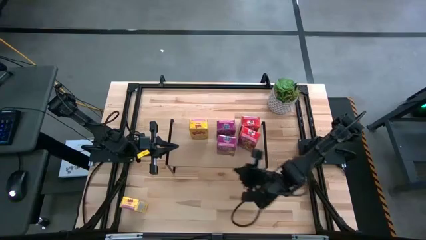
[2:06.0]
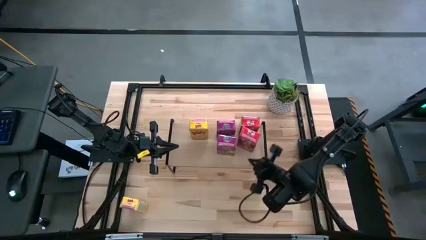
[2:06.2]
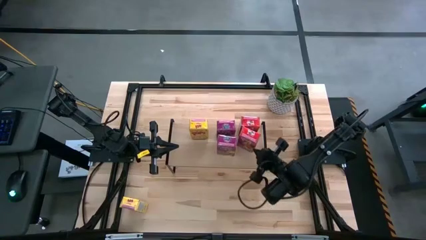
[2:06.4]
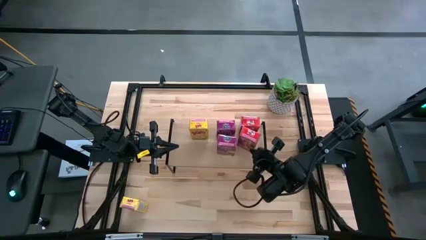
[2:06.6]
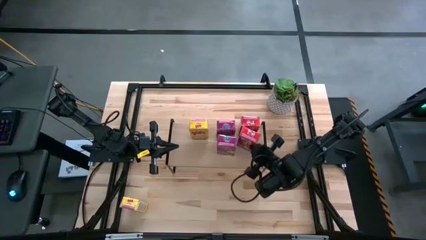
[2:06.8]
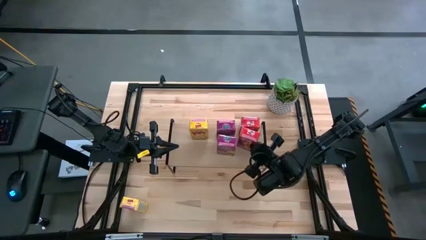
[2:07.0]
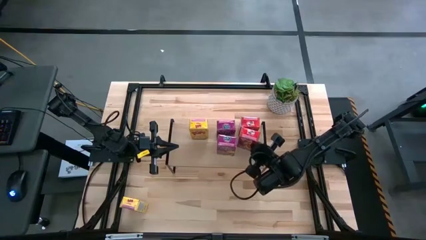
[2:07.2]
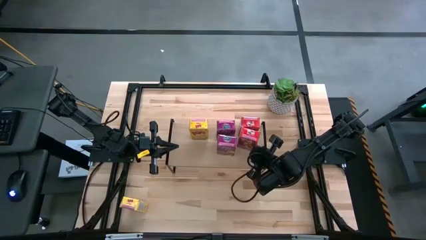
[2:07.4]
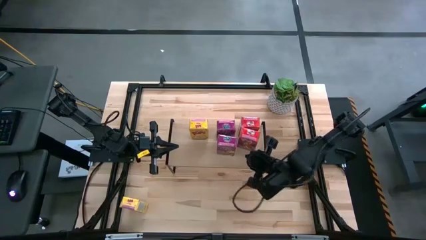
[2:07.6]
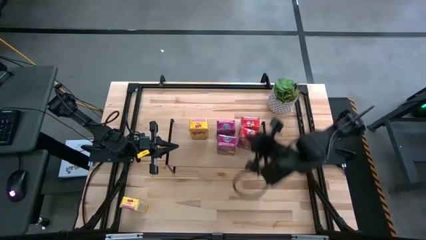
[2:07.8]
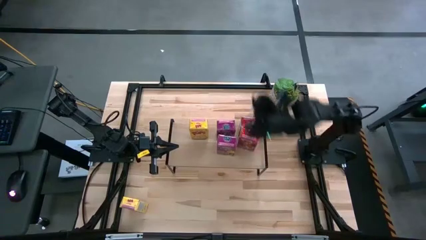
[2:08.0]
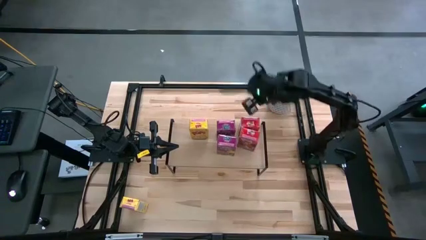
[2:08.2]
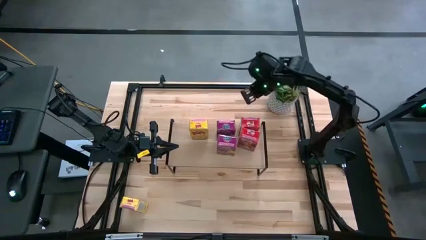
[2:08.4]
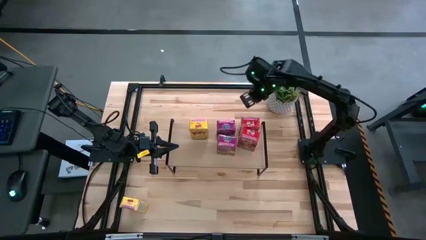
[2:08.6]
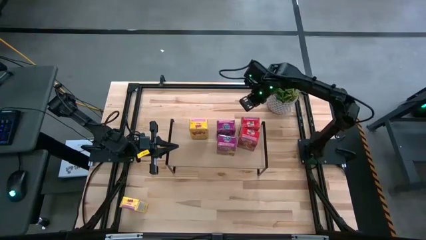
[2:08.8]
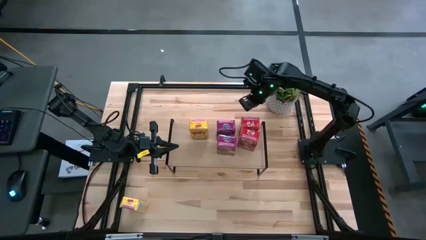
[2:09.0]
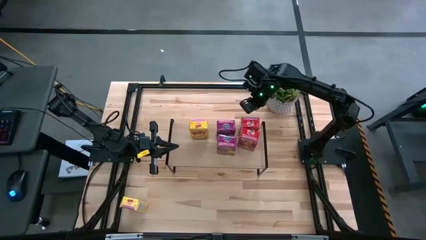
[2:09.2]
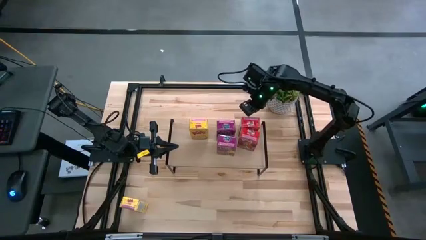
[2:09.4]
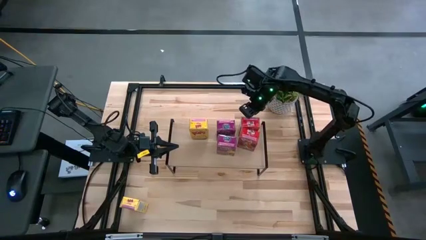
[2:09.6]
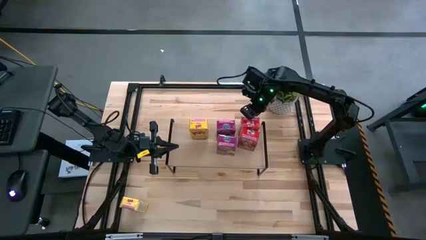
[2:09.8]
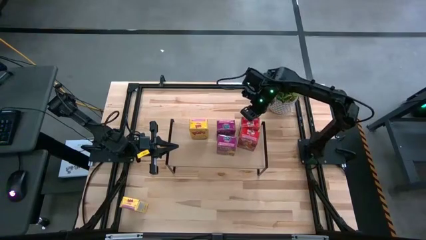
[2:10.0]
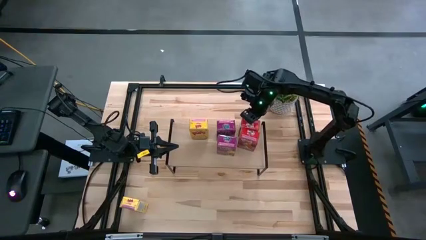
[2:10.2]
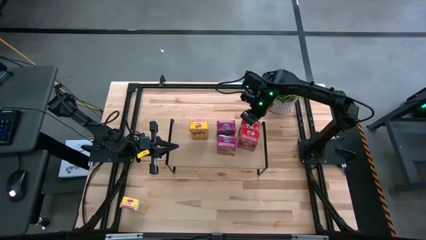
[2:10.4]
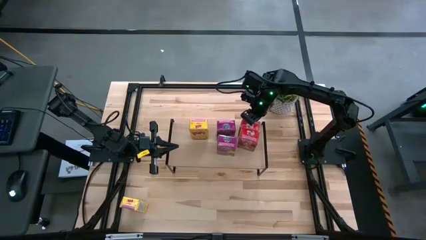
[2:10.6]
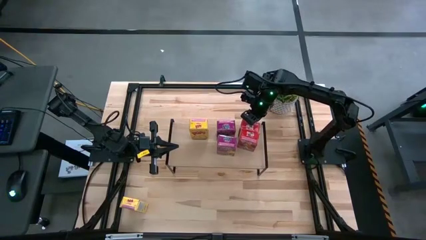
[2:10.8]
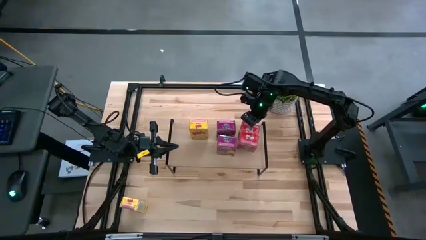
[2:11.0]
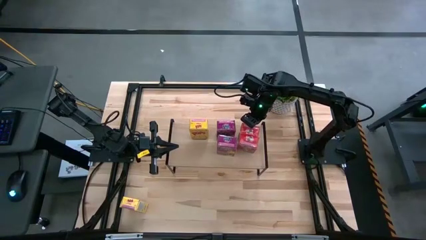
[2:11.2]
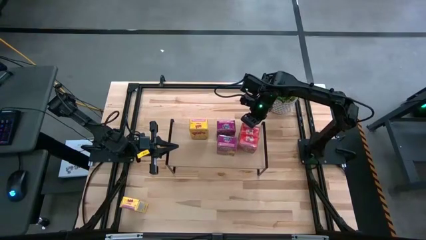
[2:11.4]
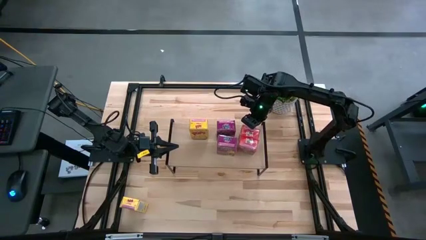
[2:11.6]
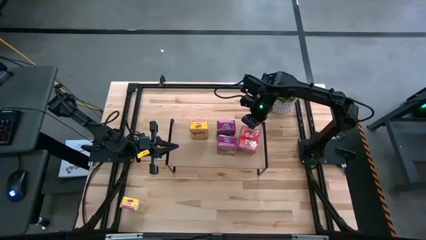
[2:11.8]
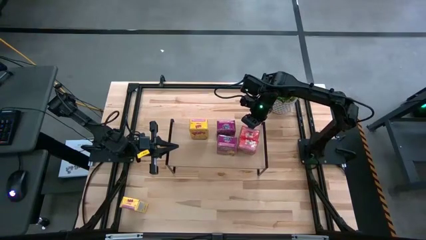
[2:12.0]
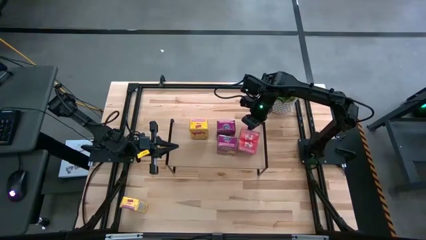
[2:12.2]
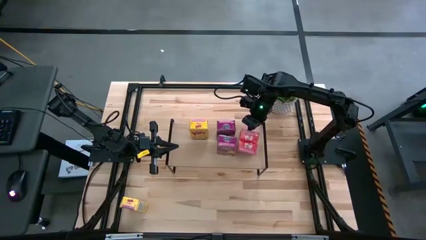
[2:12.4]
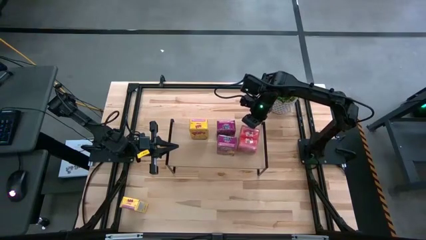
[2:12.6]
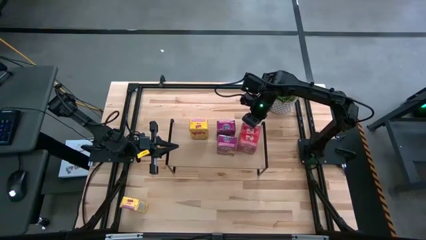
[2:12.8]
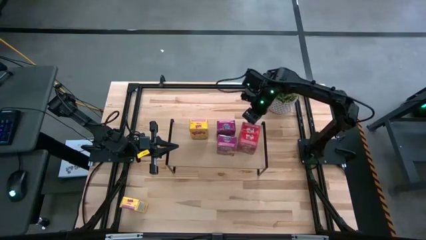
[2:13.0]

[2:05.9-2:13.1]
Task: Stack cereal on shelf
Adjust the red cereal boxes on the shelf

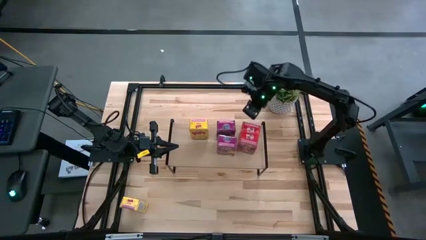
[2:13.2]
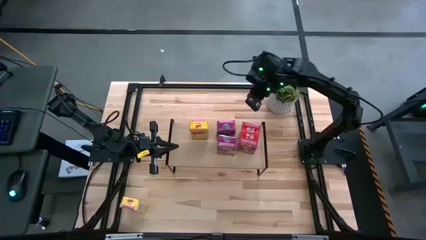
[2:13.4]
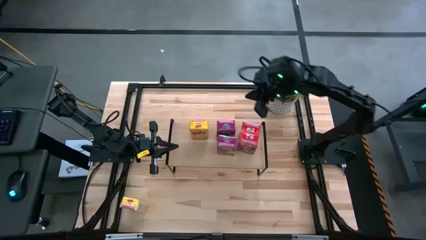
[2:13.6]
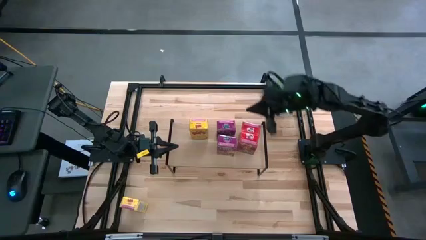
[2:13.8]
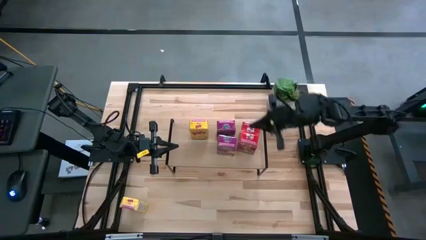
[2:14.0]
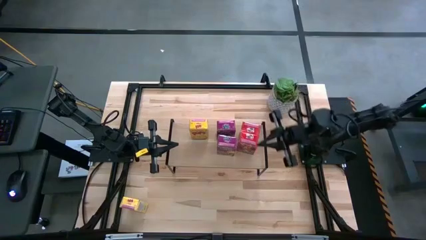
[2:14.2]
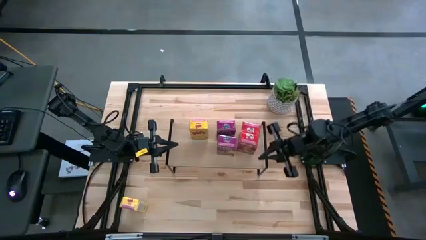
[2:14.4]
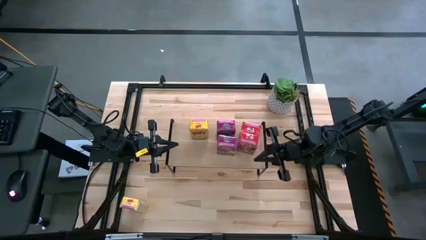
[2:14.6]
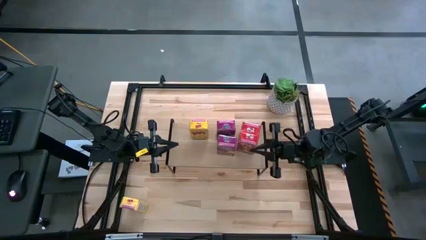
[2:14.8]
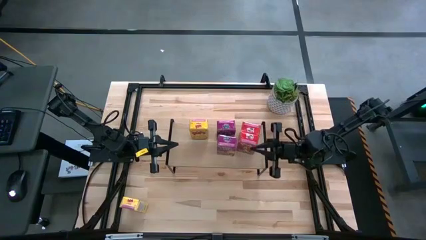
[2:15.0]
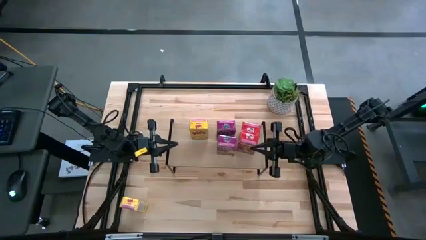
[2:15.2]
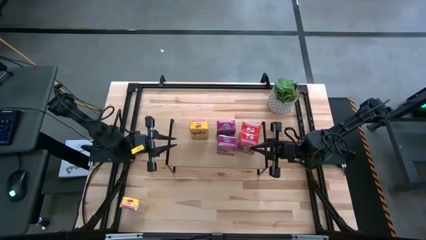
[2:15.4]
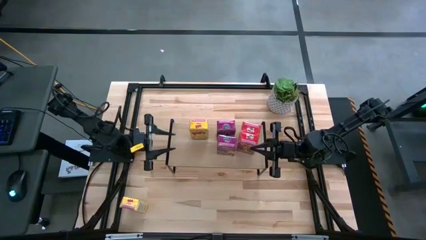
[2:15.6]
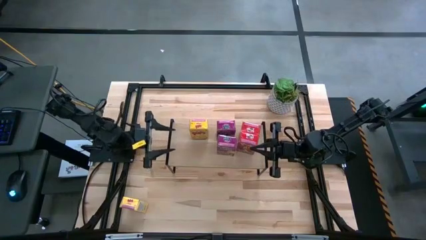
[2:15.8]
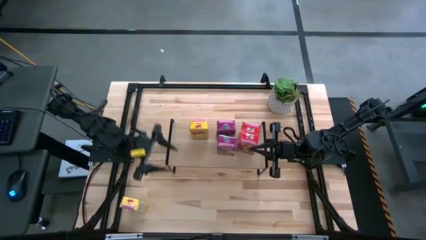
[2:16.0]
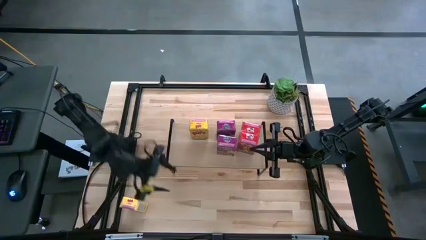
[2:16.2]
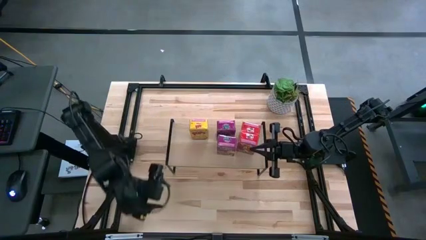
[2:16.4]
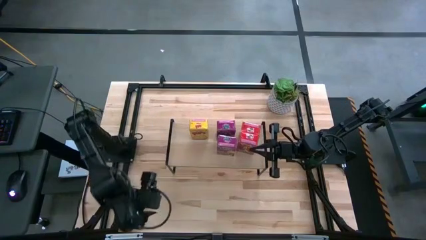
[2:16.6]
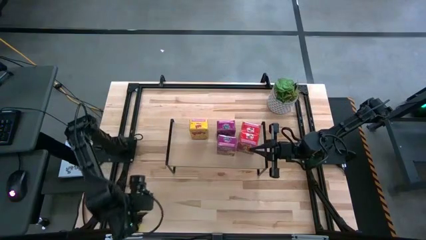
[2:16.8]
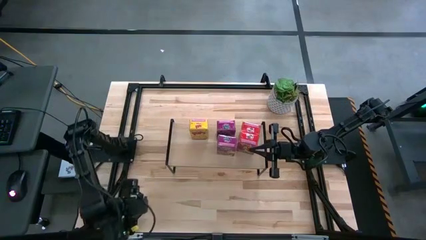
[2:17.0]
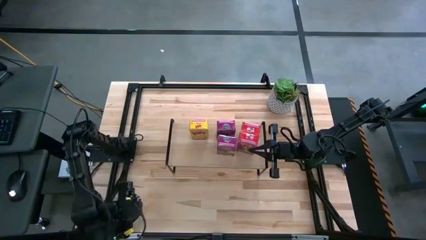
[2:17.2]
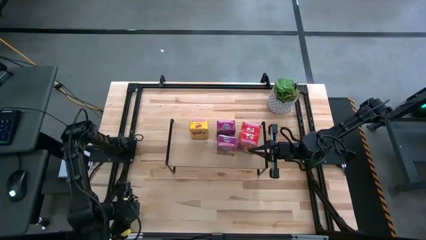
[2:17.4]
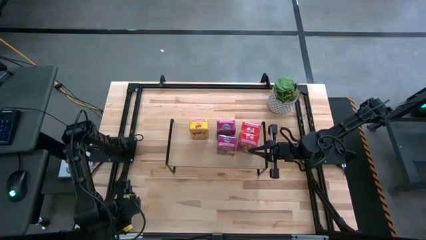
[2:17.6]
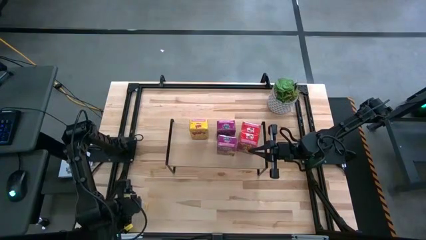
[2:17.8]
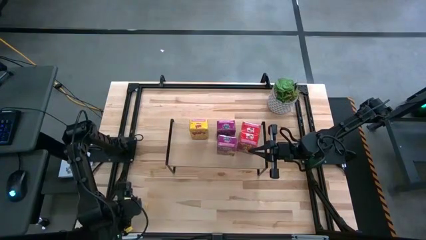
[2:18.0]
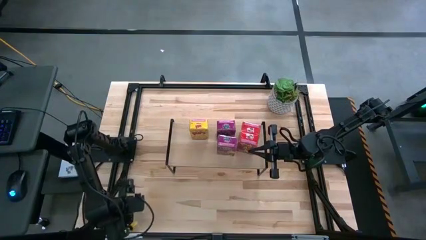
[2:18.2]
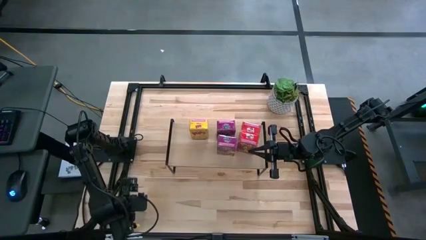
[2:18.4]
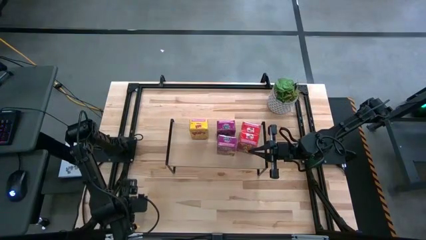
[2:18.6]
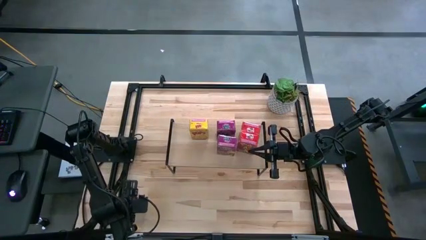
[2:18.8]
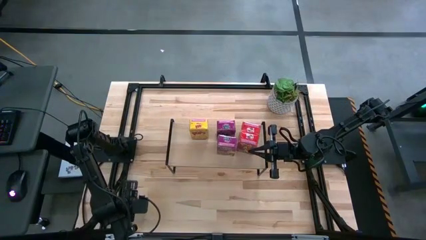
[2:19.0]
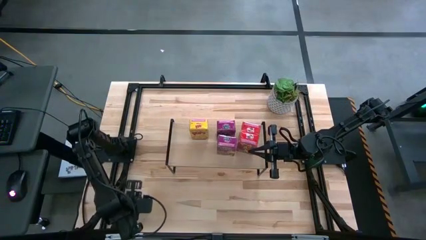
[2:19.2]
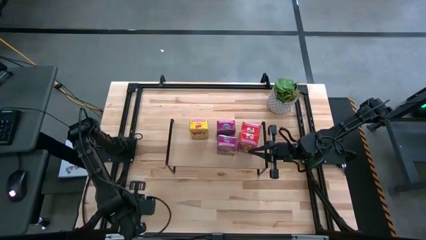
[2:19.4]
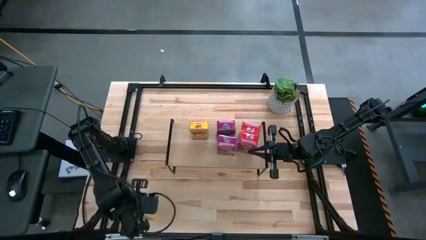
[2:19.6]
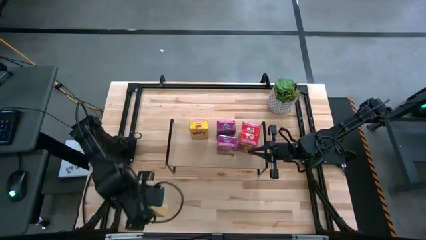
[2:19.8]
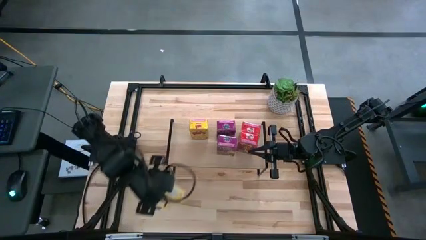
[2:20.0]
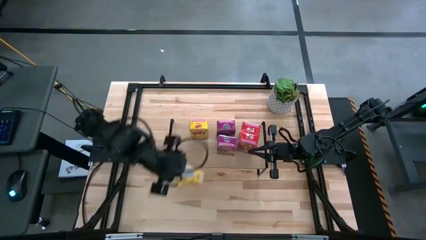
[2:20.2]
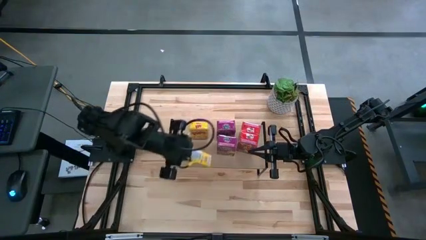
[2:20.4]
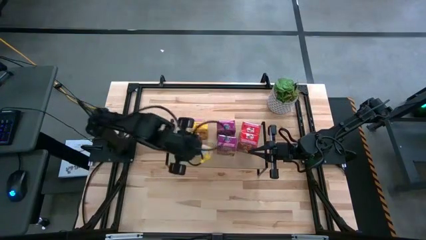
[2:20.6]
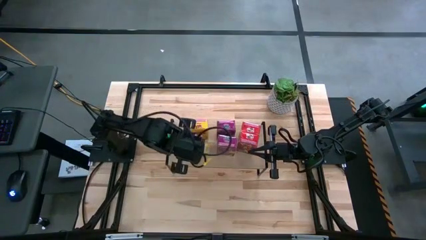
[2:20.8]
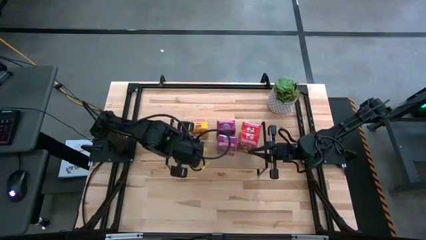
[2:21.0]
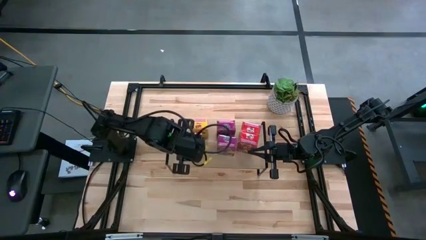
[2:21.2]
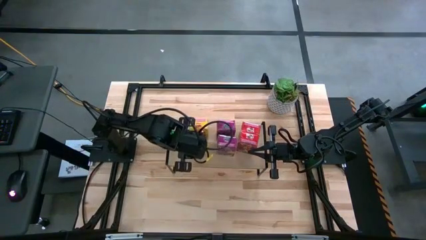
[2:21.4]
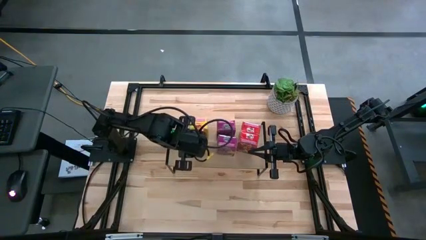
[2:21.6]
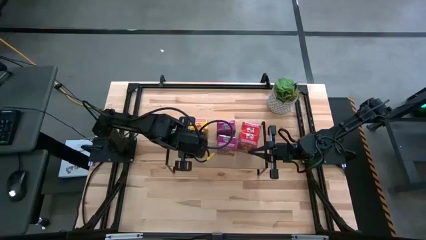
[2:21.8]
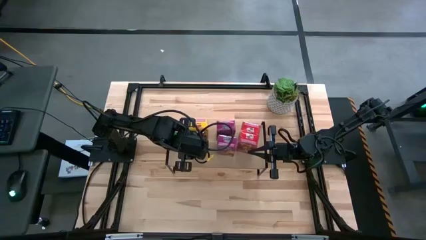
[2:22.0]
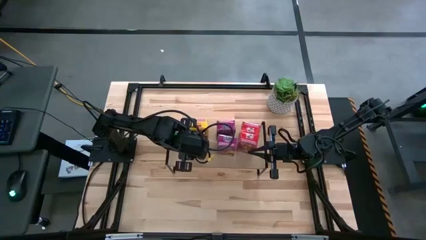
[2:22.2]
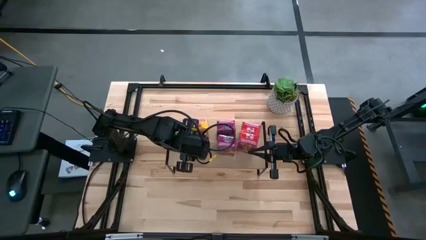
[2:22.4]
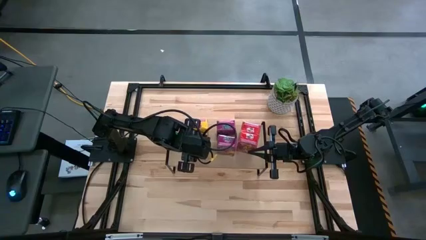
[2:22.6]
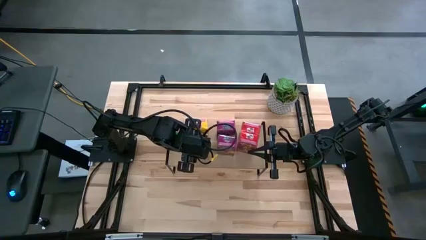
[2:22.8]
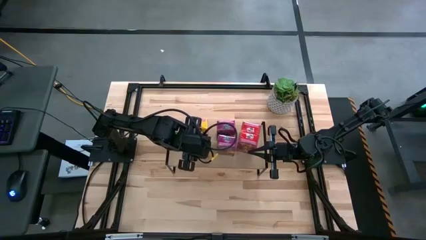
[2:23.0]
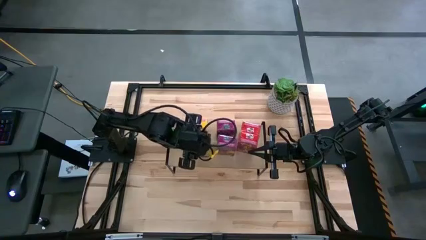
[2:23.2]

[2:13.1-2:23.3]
Put the yellow cereal box on the shelf
